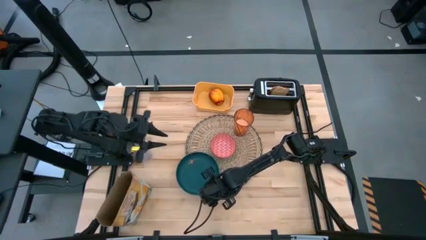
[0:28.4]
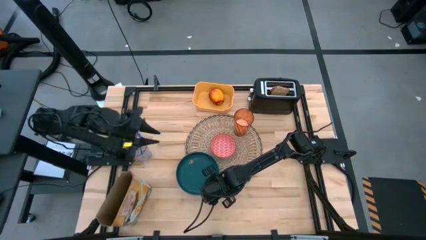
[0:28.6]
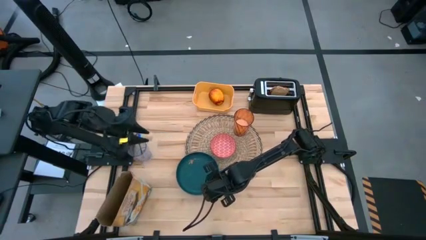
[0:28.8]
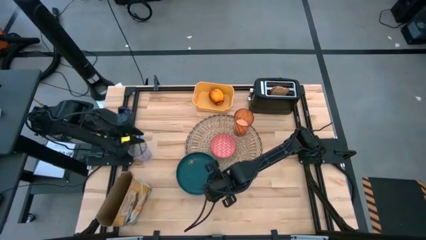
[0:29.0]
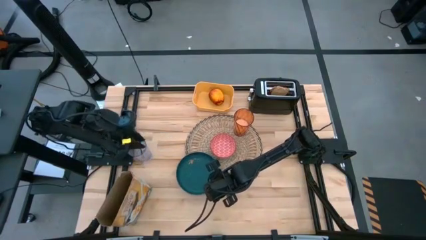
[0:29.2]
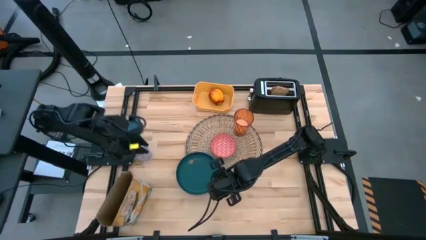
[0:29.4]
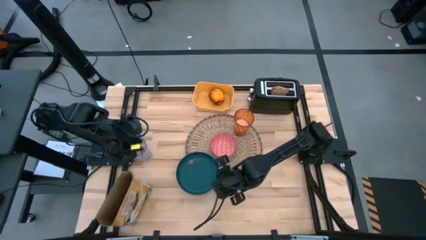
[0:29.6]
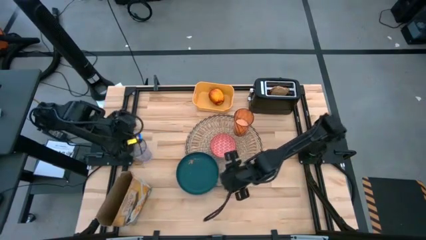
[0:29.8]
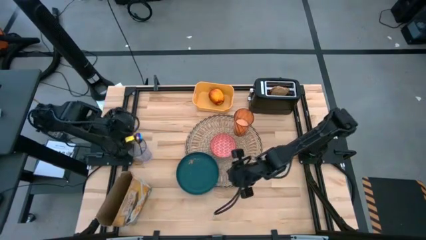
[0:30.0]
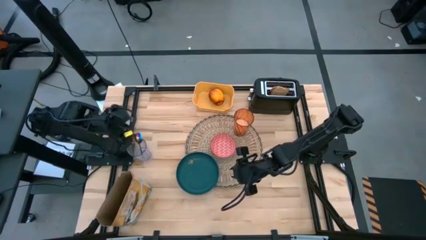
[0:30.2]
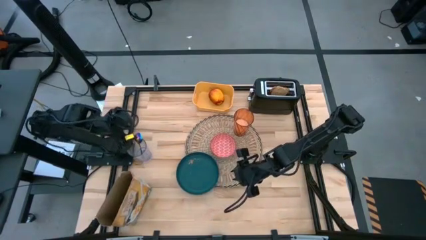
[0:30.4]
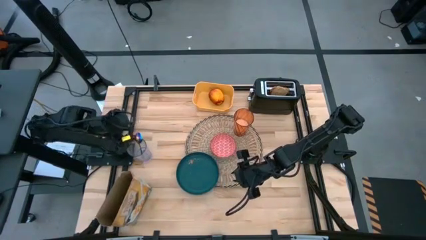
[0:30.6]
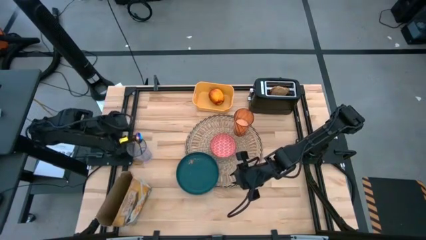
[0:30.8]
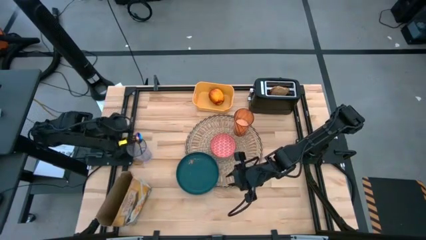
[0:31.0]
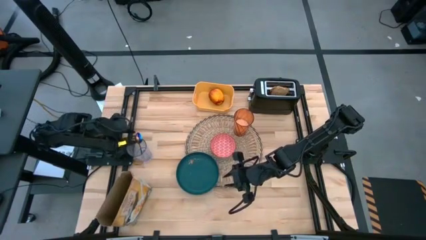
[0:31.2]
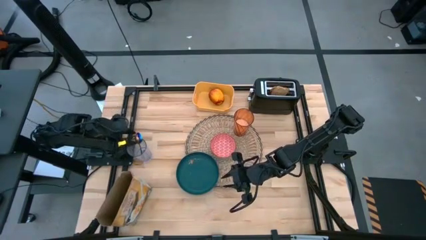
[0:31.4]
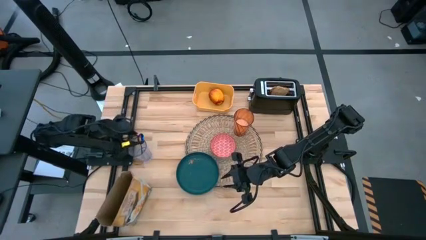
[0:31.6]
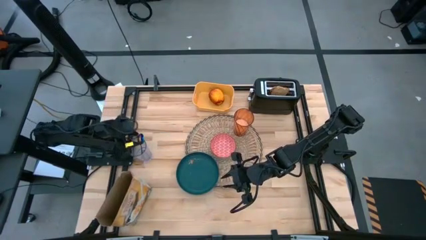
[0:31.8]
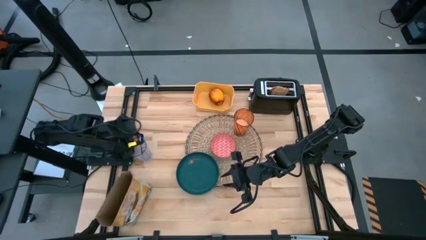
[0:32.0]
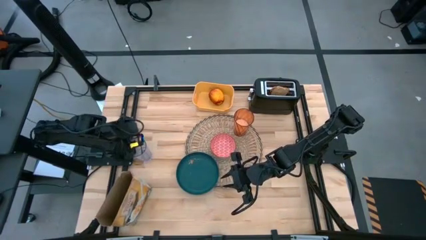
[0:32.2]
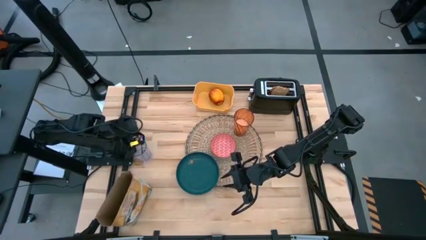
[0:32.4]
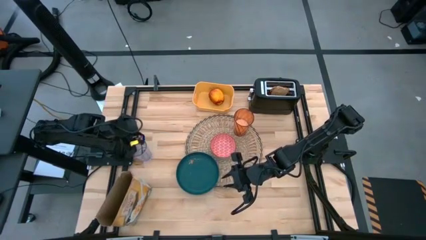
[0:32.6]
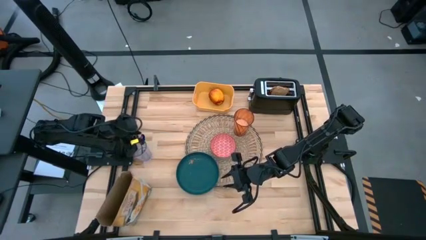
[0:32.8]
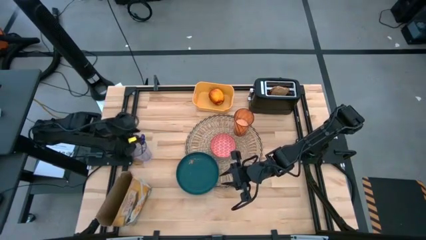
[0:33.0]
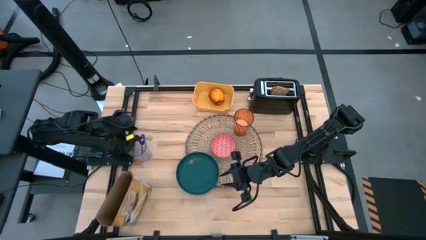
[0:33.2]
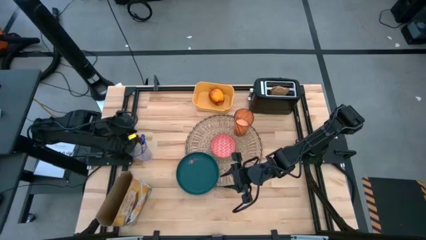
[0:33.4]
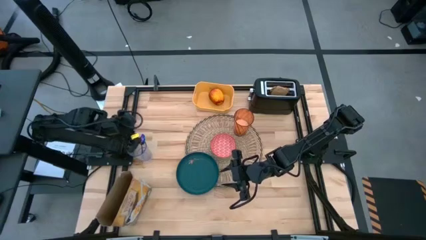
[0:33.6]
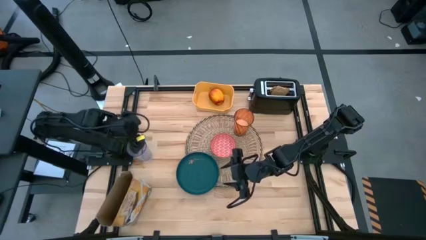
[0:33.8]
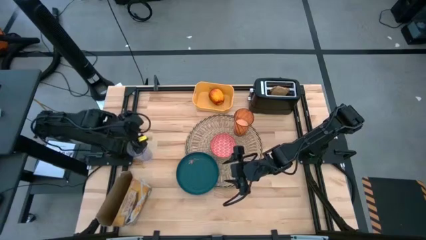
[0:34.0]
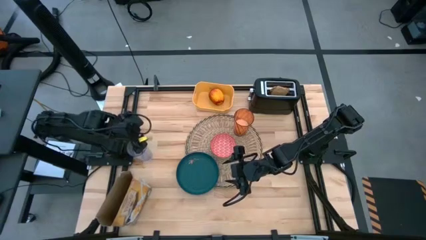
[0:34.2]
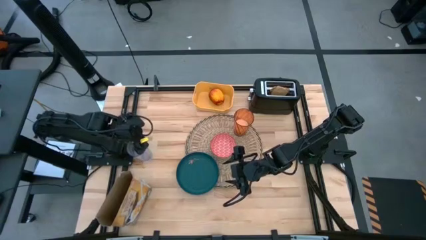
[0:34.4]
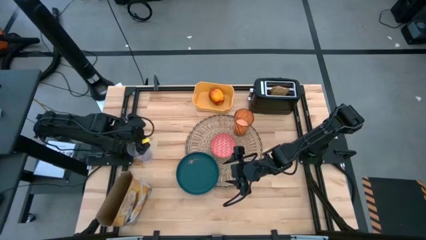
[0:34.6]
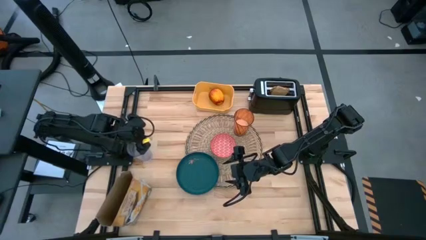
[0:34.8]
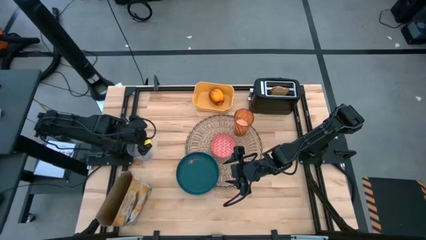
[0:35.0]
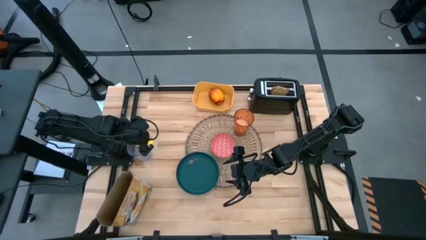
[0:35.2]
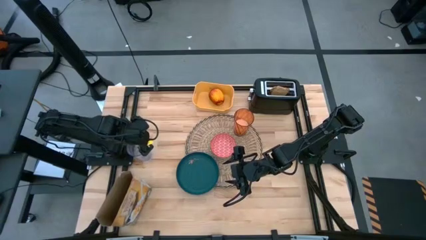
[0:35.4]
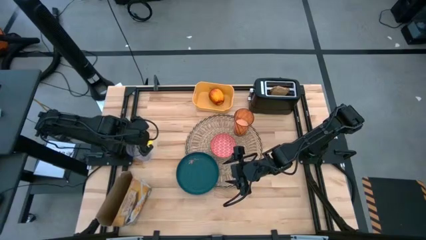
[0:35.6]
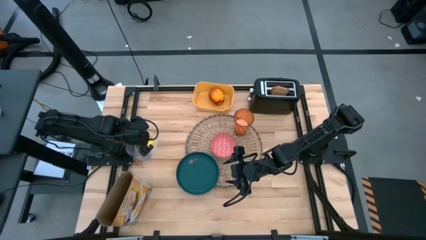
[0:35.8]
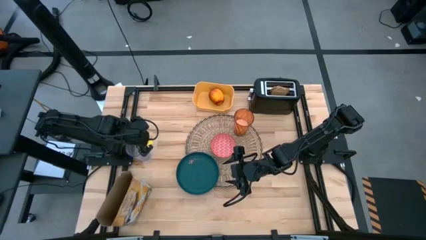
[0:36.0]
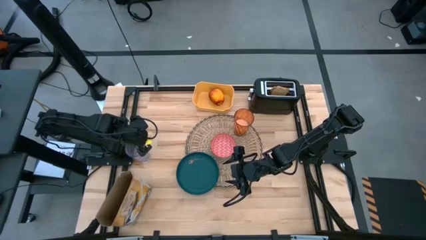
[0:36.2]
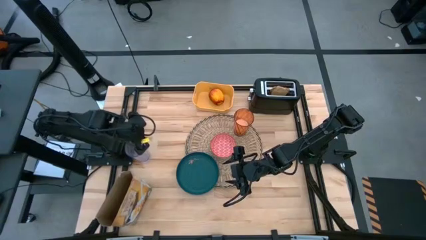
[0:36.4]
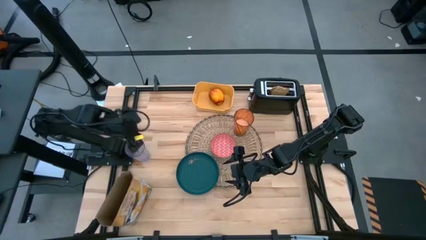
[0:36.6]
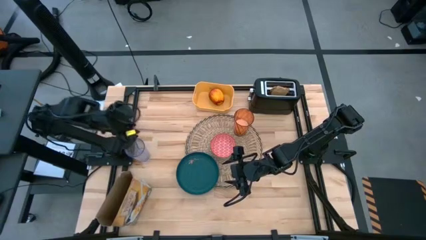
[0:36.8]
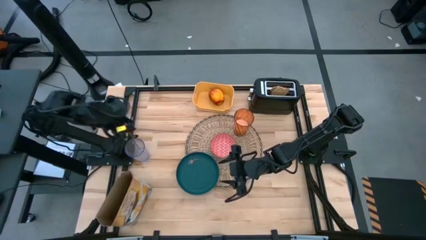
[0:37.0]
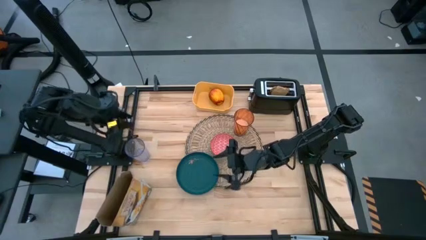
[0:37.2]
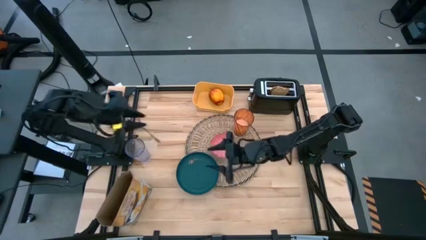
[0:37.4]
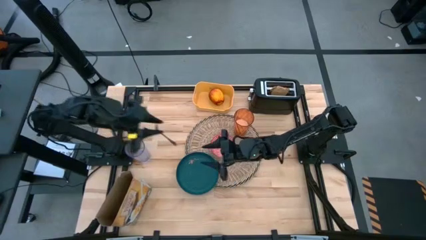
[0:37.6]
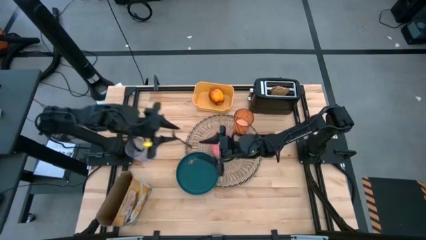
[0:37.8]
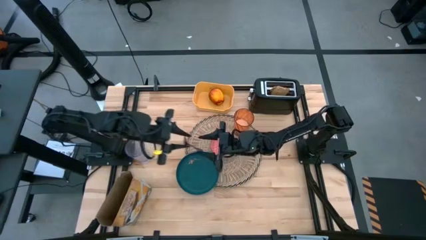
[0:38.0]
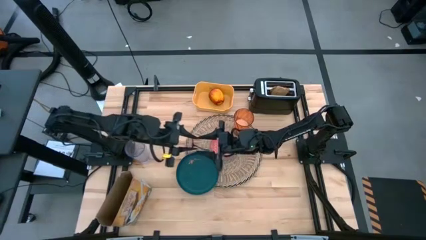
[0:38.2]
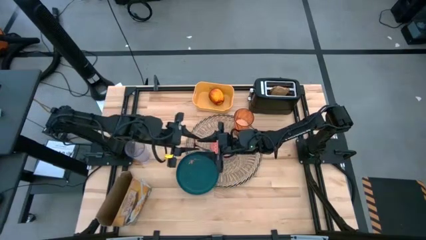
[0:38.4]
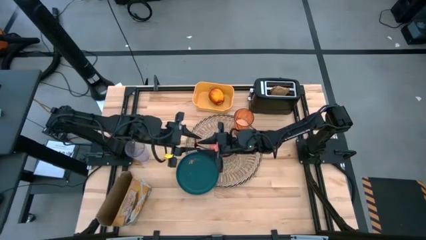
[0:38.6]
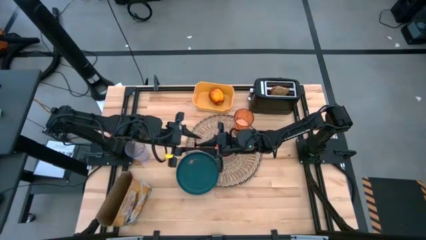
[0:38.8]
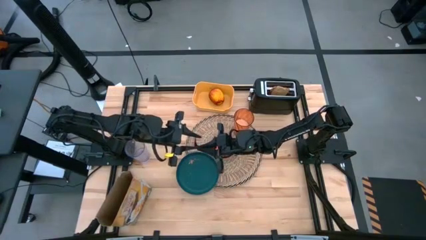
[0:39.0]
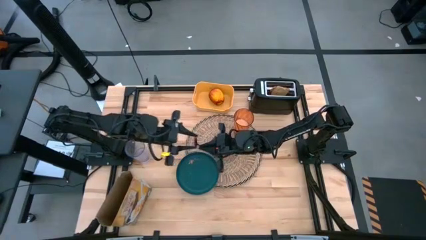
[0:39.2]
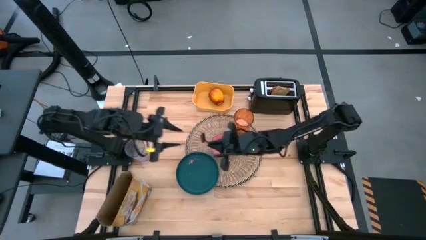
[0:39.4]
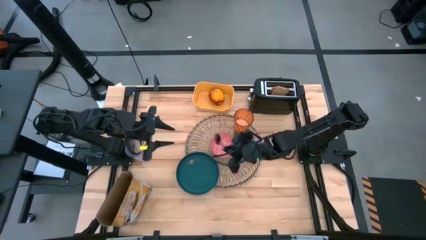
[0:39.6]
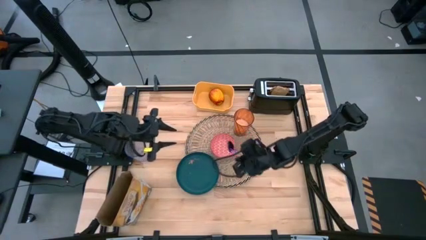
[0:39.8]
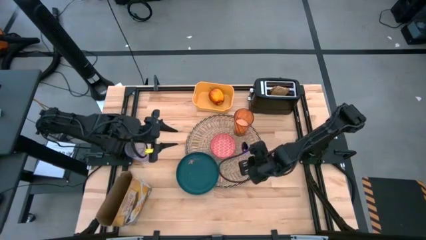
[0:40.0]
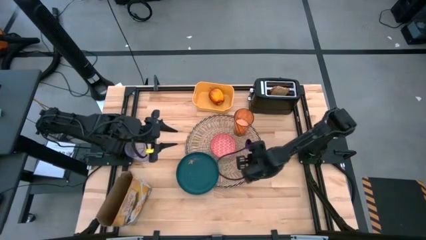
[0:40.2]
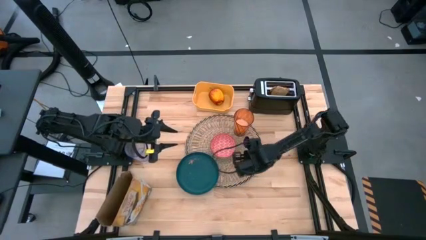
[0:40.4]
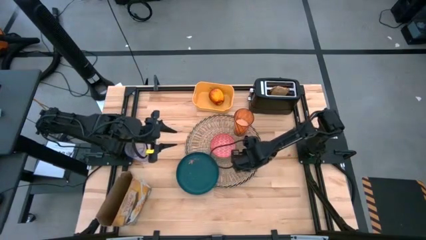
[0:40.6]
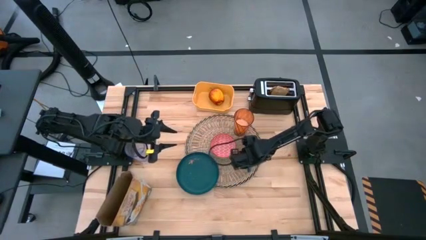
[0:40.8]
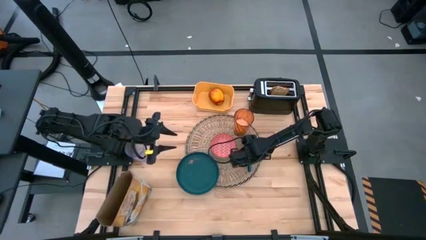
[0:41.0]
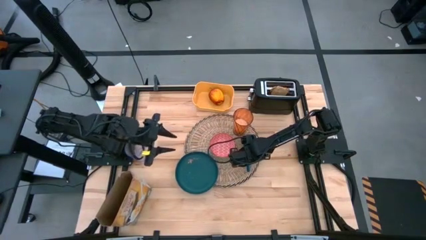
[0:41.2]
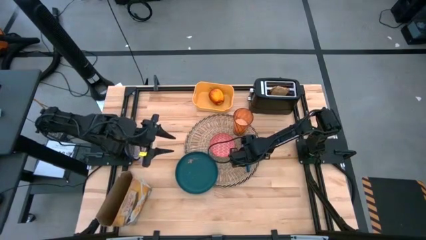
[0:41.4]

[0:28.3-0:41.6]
Task: Arrange a breakfast setting
Put the violet spoon on the brown table mat to the right of the red bowl
